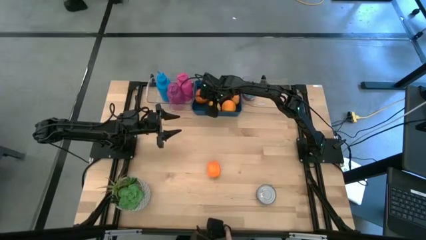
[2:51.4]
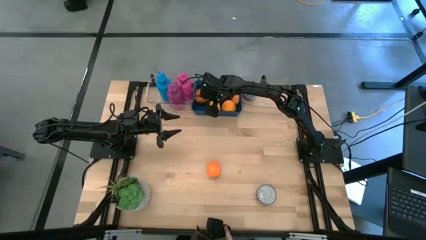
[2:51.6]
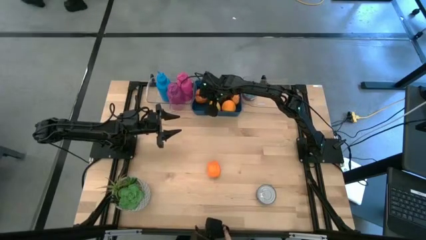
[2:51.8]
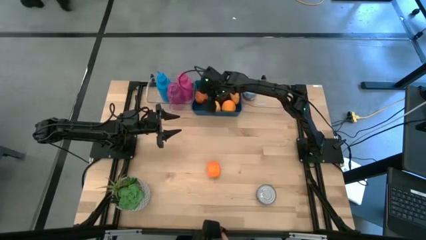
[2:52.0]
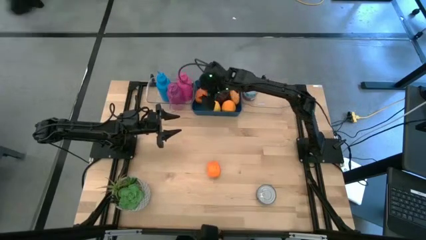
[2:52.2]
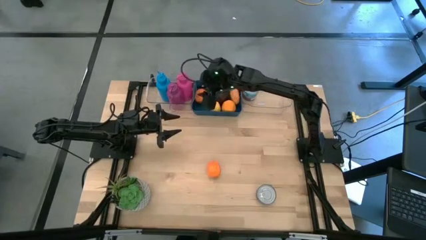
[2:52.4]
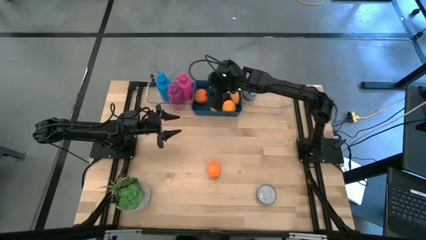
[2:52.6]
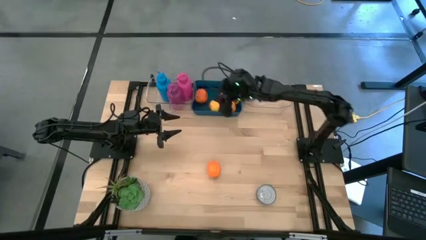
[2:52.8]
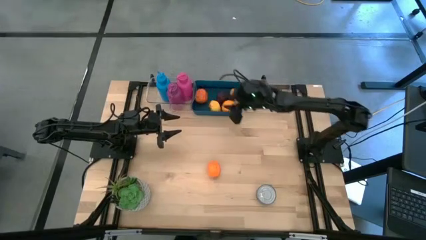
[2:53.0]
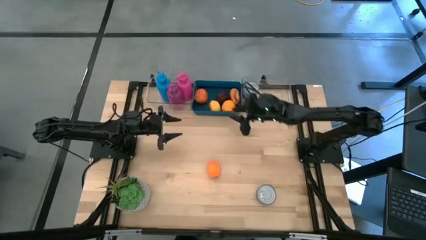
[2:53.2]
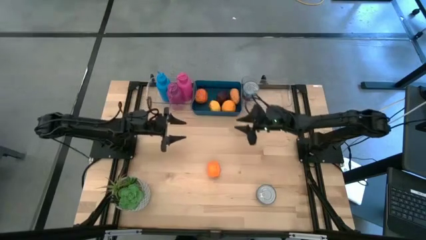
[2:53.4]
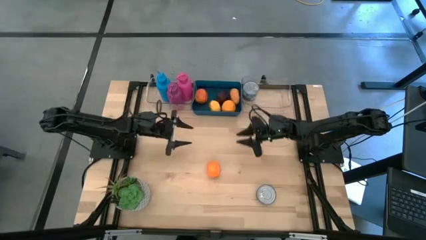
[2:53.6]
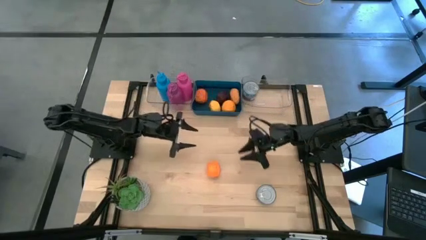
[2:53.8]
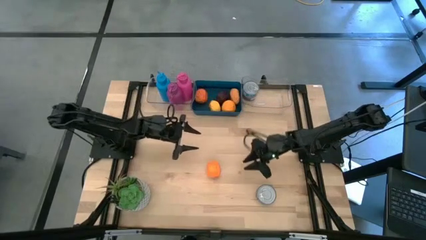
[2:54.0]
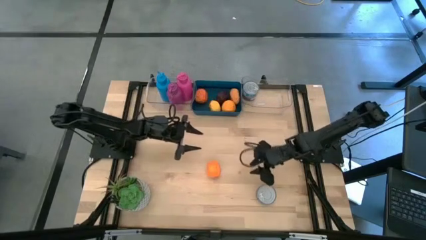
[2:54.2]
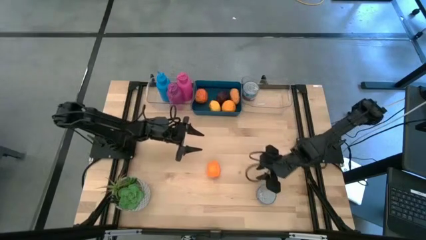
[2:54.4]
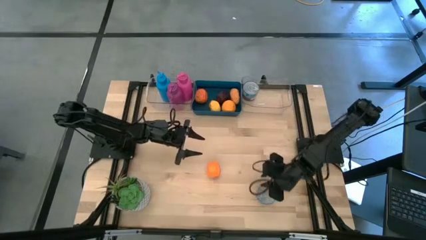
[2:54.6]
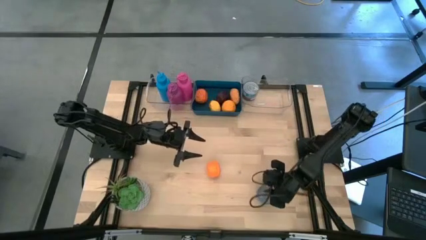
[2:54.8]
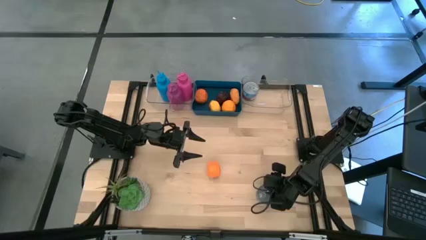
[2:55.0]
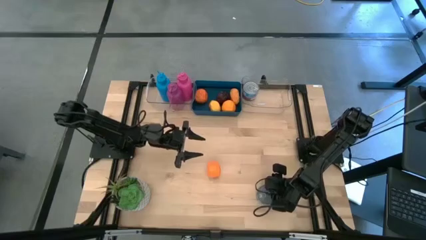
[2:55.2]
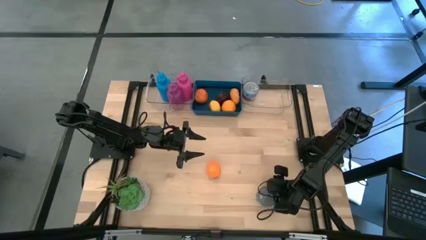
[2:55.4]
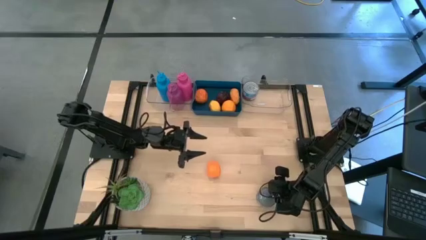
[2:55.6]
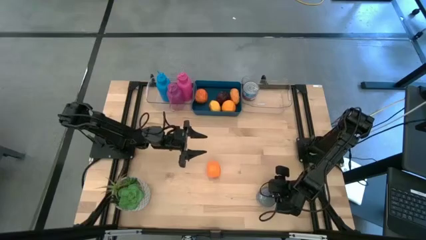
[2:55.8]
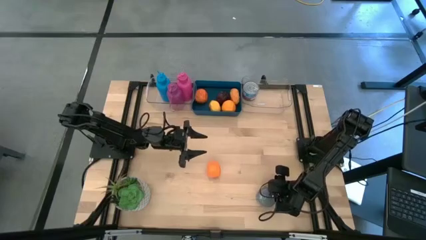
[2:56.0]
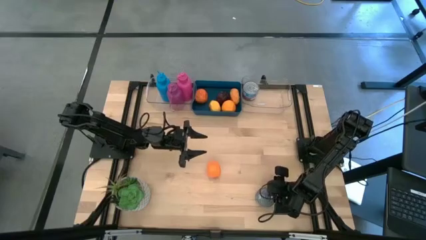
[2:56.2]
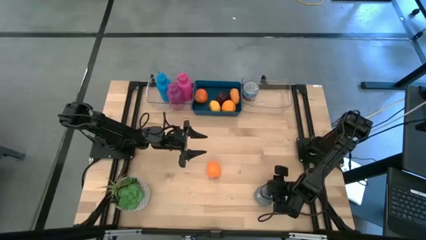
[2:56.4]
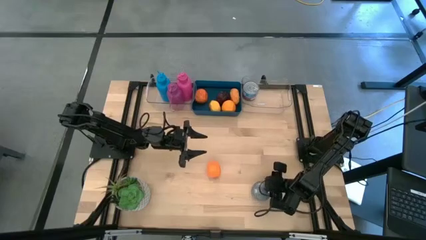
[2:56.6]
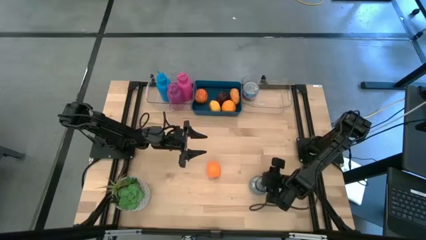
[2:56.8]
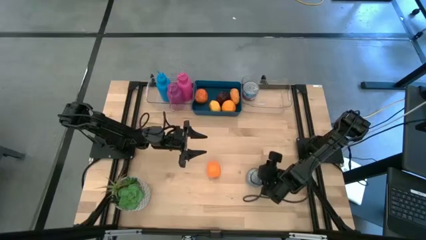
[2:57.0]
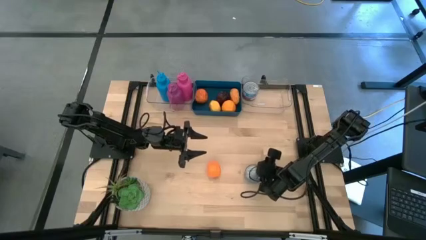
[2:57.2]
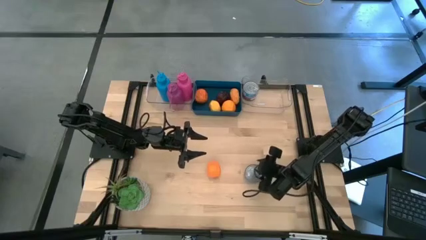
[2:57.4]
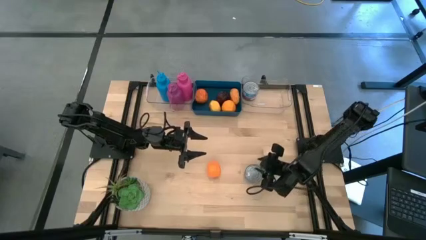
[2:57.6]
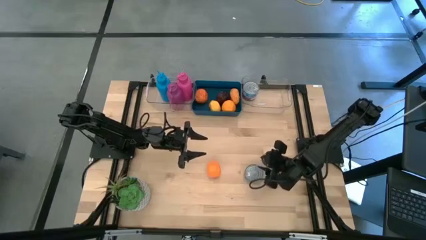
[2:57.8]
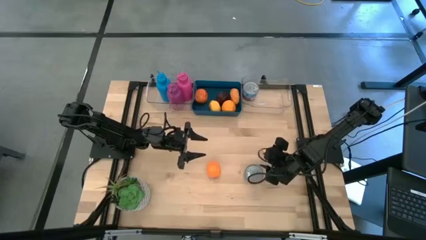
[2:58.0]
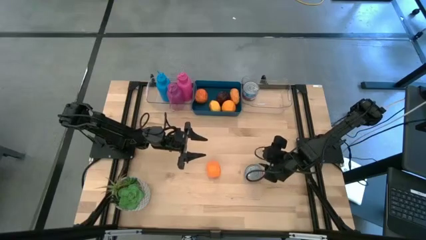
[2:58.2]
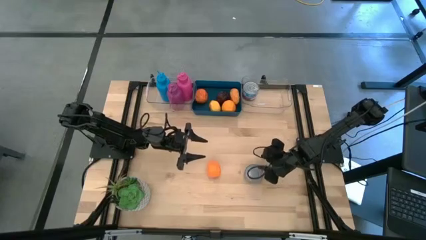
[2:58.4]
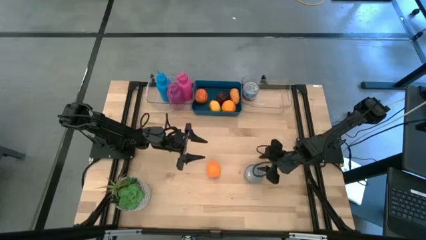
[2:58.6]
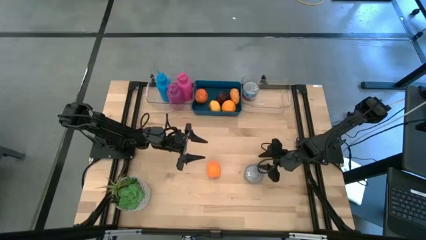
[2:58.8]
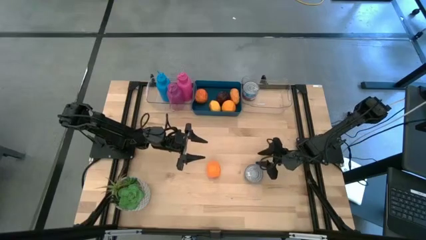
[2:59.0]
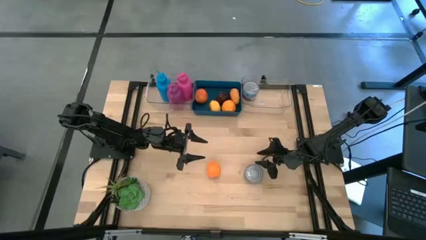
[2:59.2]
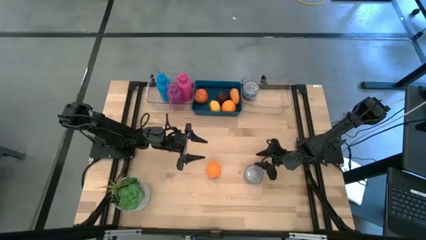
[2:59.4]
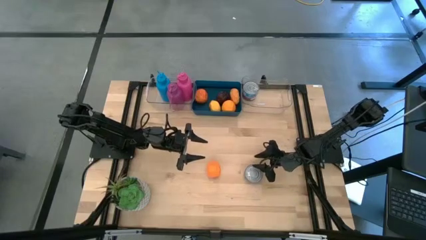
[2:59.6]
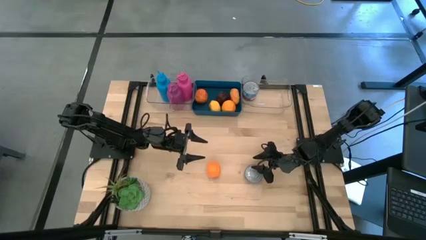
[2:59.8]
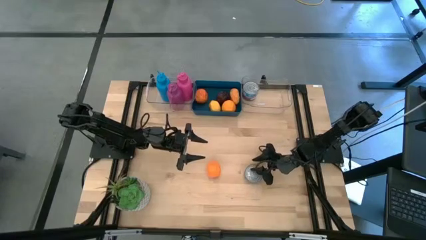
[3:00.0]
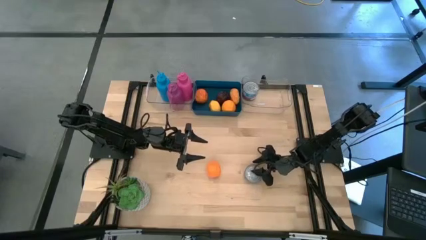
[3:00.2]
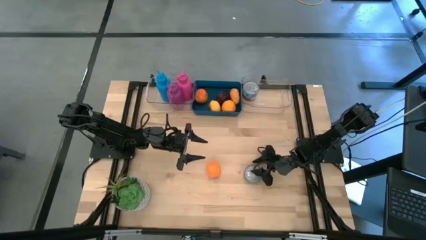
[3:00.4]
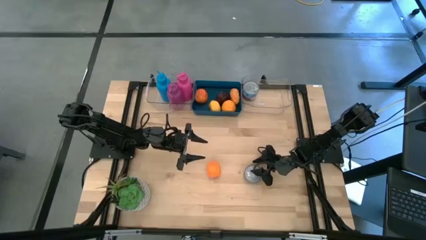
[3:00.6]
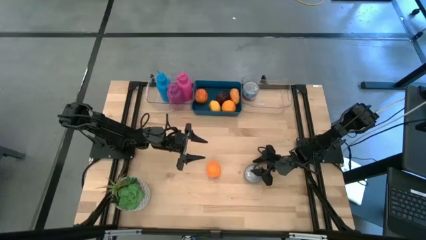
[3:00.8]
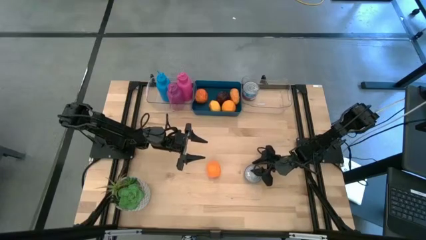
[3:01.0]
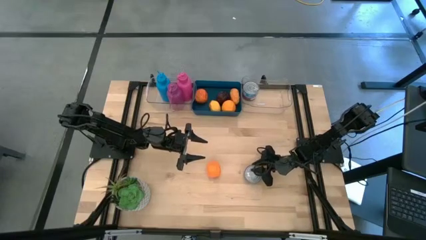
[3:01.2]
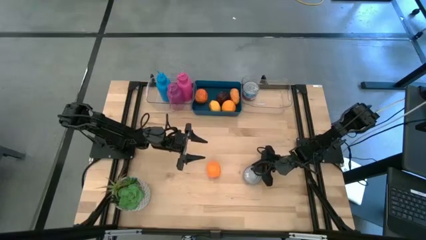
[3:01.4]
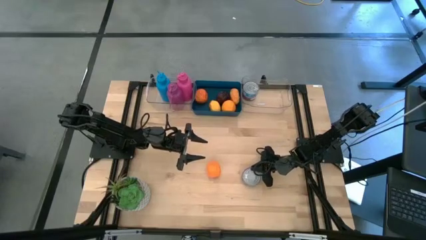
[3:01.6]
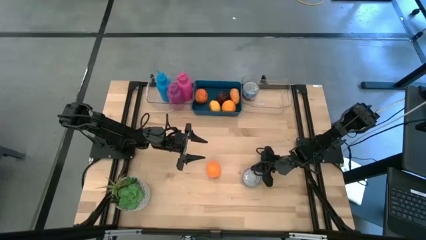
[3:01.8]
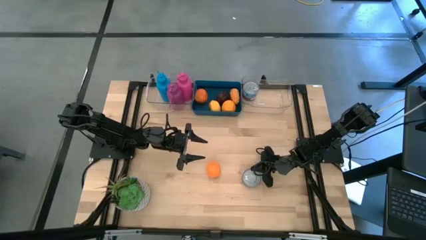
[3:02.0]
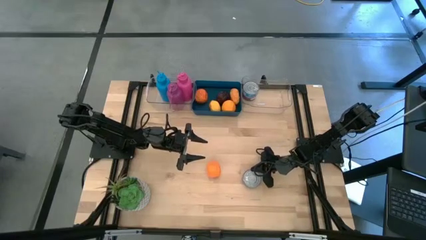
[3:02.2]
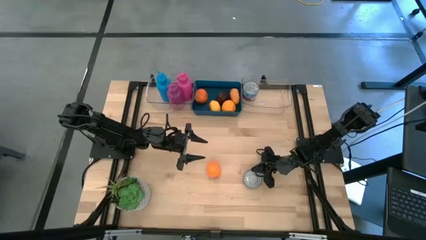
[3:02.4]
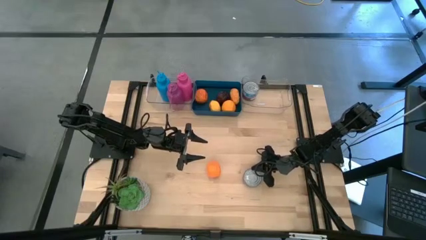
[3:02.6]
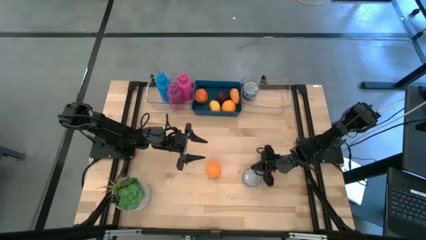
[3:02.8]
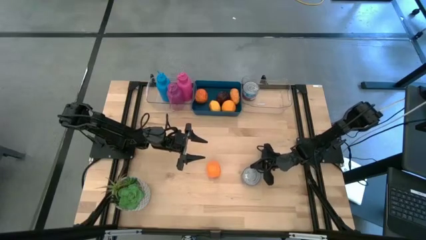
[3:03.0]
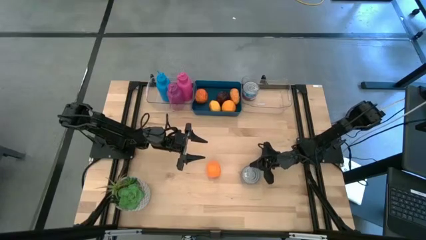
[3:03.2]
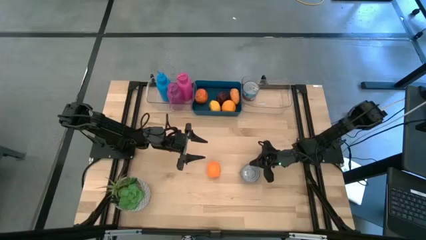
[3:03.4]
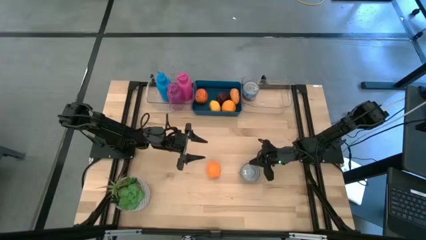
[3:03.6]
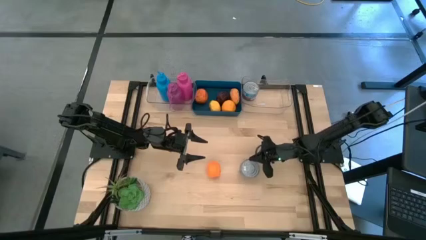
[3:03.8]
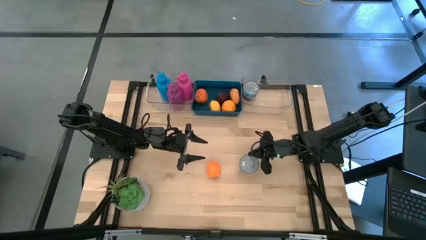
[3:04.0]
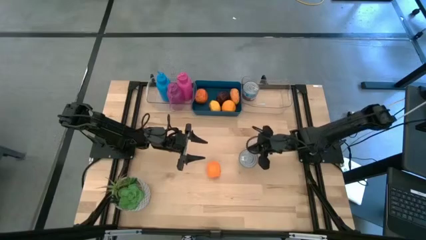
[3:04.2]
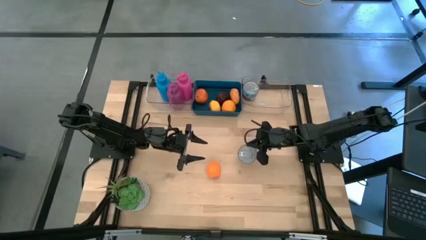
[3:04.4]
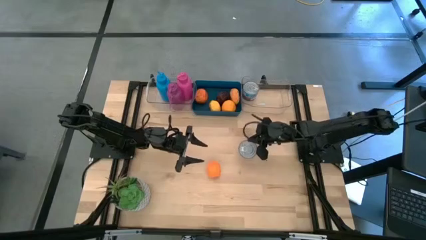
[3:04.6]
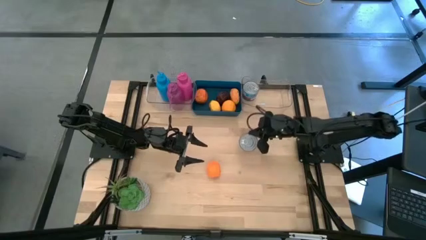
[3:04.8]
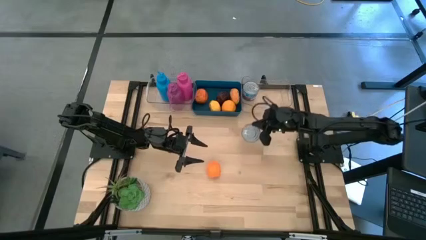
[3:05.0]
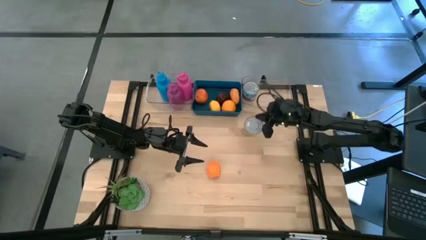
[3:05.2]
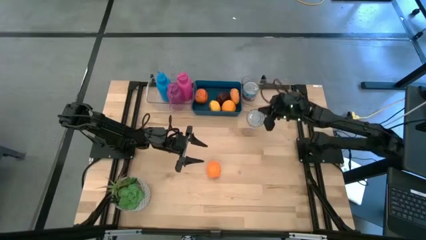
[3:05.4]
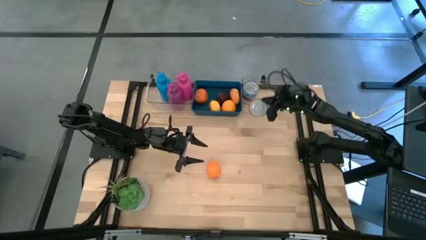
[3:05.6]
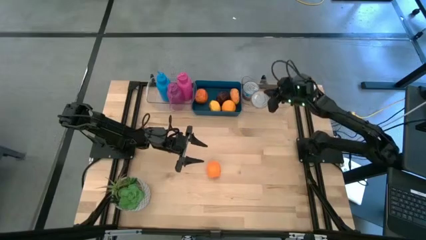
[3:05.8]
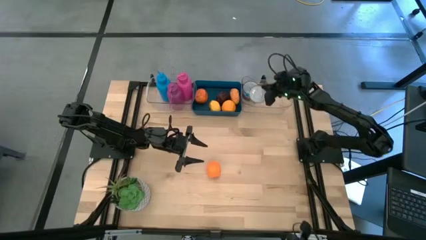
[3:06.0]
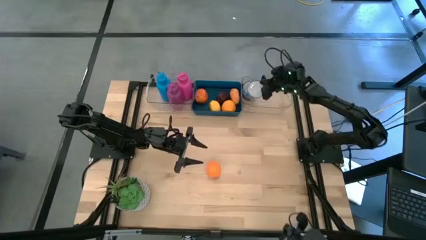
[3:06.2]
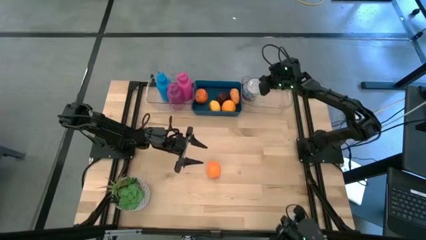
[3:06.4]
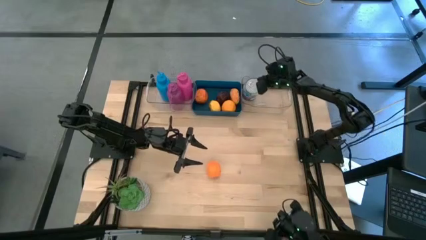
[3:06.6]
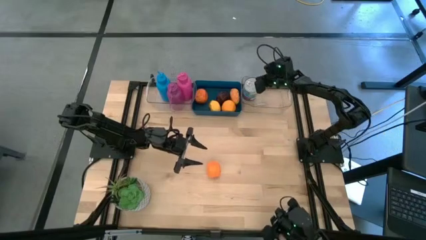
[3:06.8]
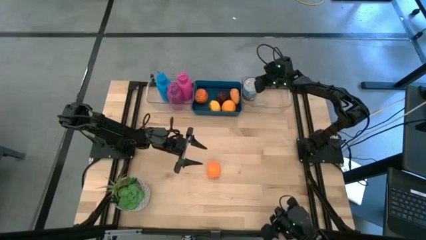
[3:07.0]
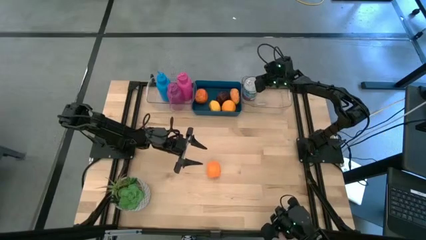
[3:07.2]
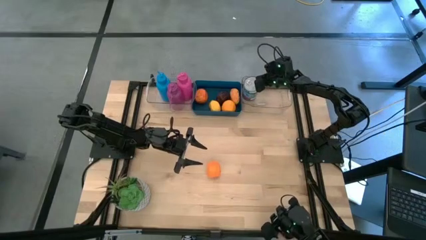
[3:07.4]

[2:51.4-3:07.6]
Task: Pick & Place Food Item
Stack the blue can on top of the yellow blue can in the right transparent bin
